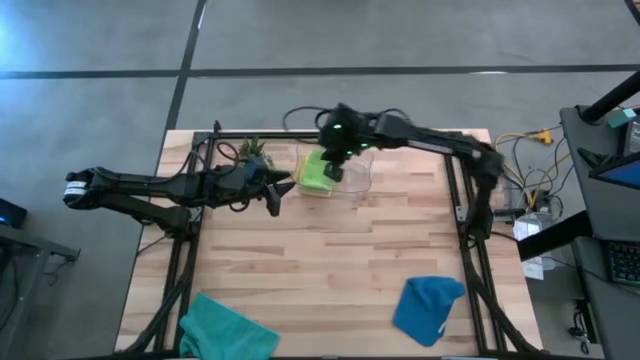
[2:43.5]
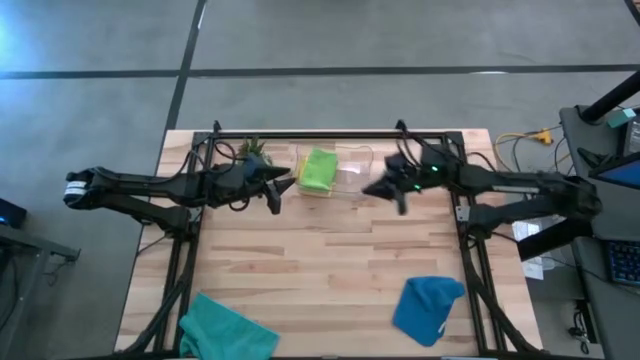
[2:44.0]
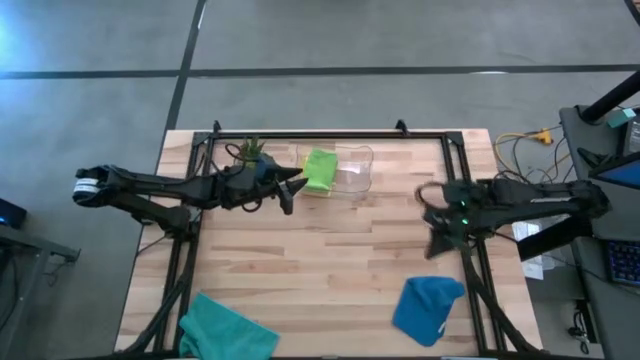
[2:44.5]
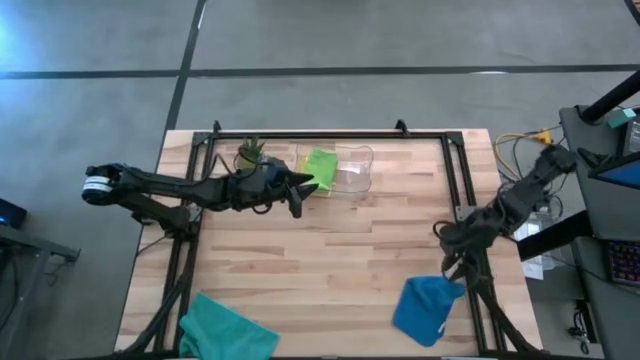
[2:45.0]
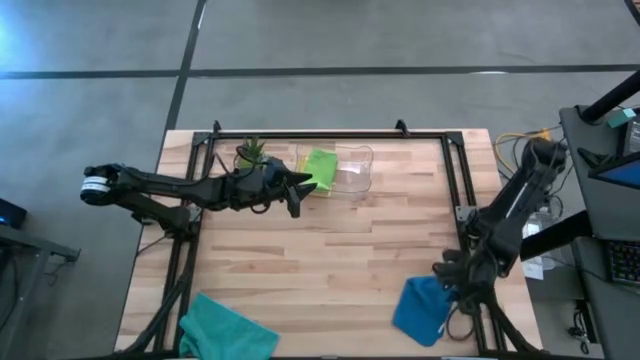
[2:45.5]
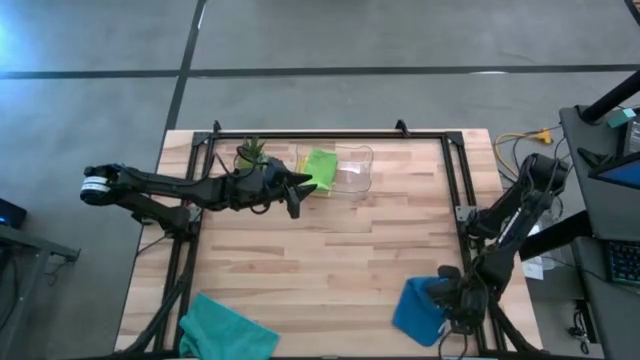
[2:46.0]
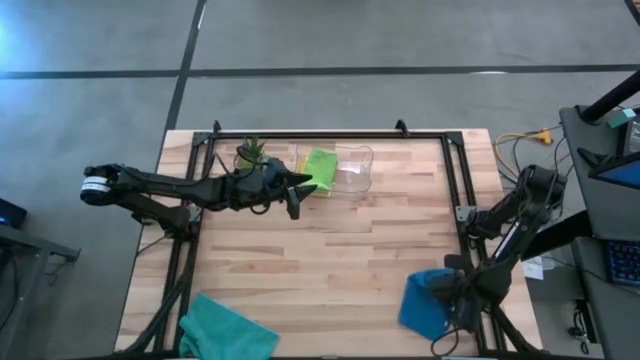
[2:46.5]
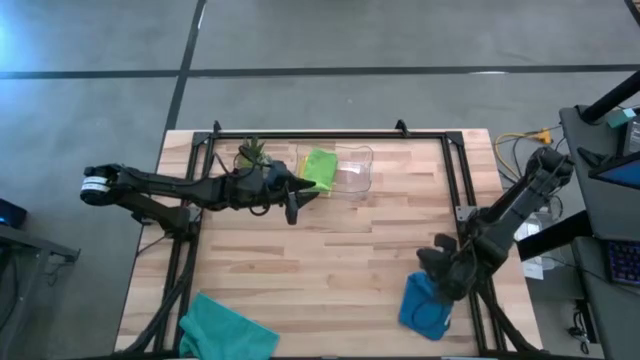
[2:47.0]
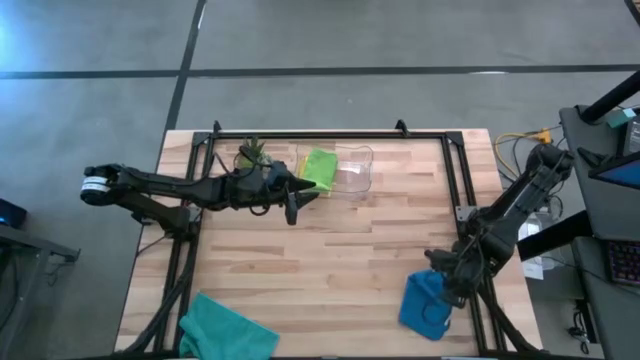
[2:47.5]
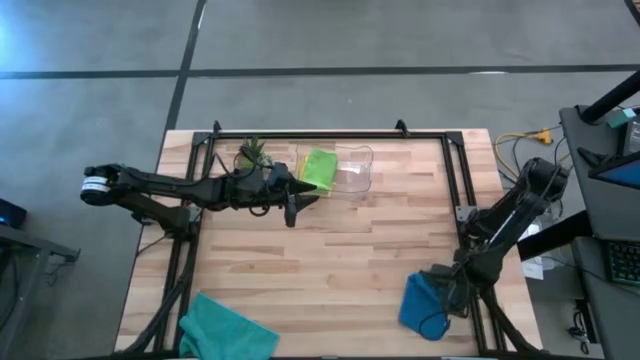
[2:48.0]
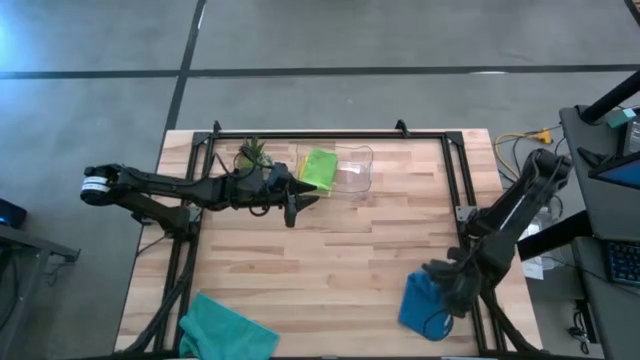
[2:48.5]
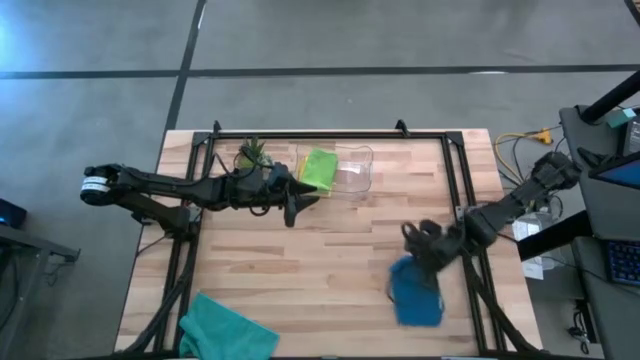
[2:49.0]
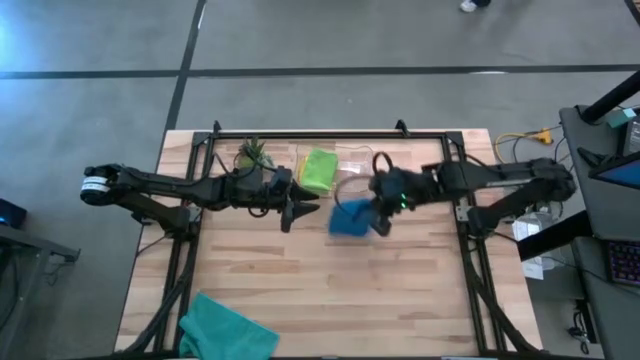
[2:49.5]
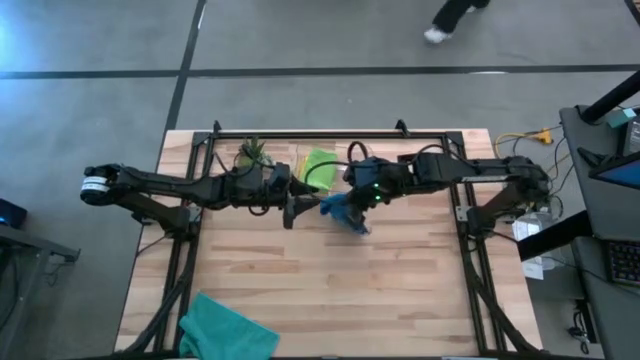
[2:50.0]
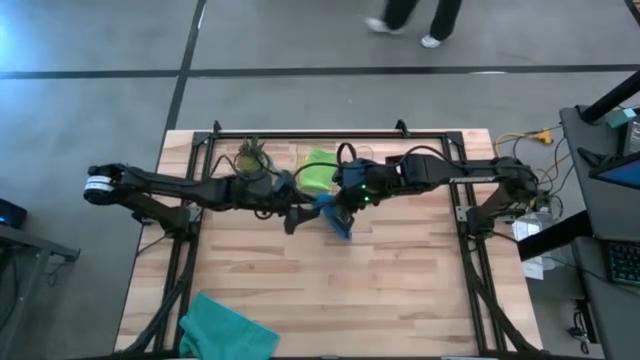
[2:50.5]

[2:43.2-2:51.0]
Task: Fold microfiber towels
Fold the blue microfiber towel

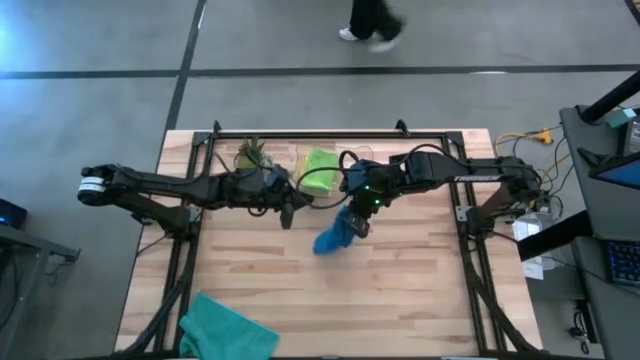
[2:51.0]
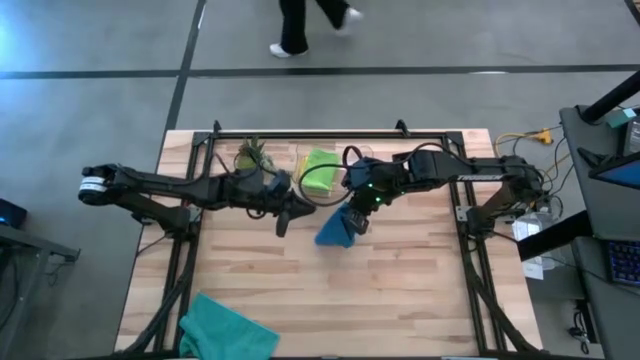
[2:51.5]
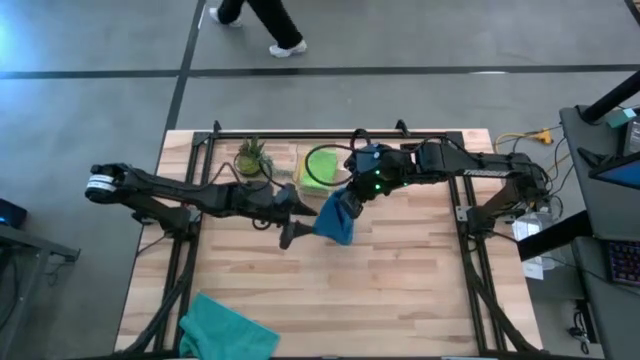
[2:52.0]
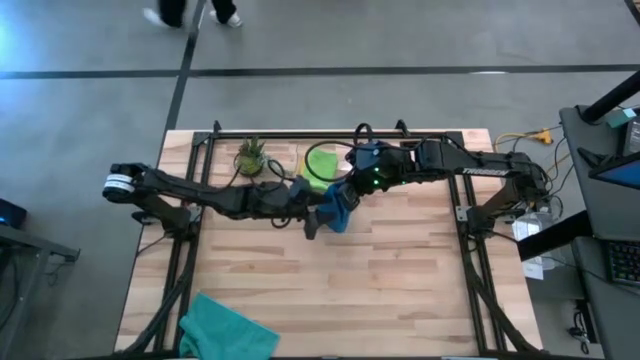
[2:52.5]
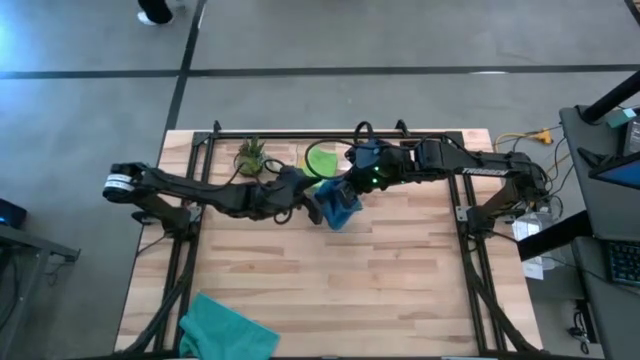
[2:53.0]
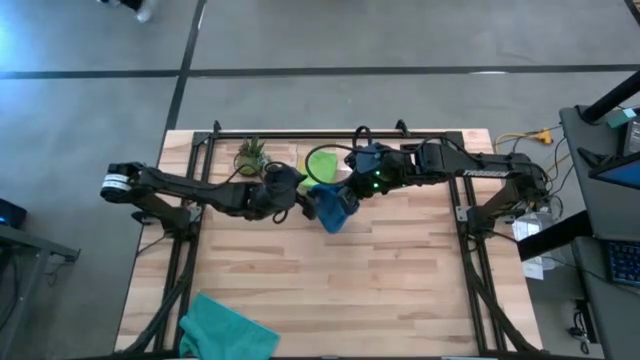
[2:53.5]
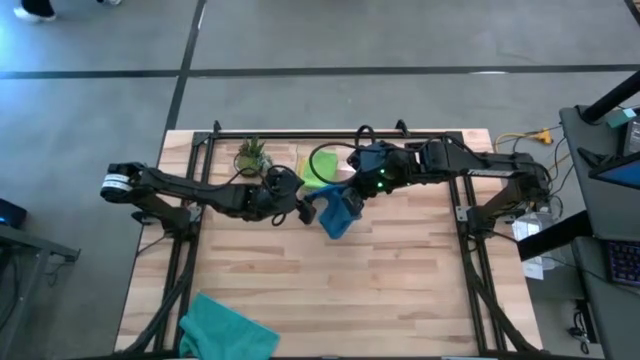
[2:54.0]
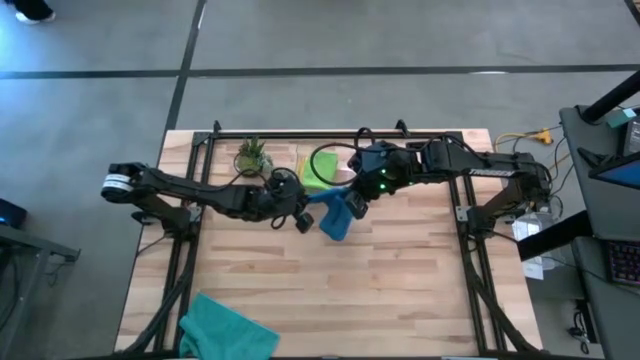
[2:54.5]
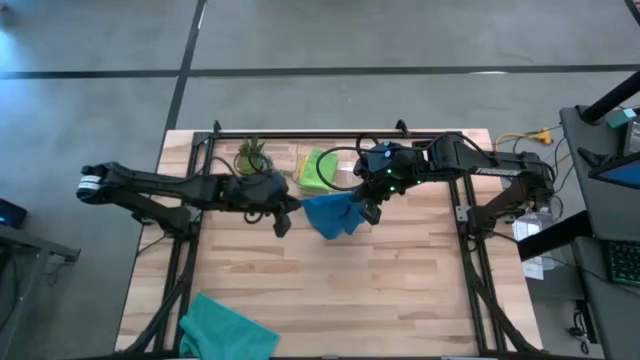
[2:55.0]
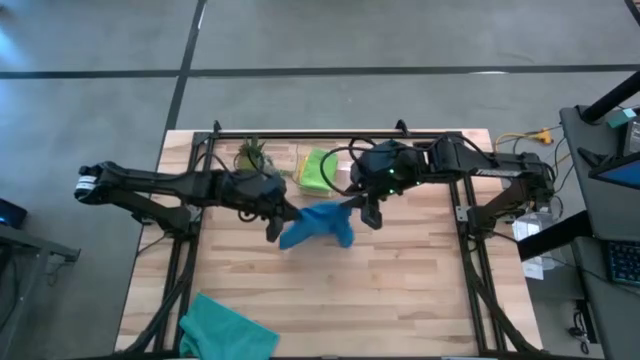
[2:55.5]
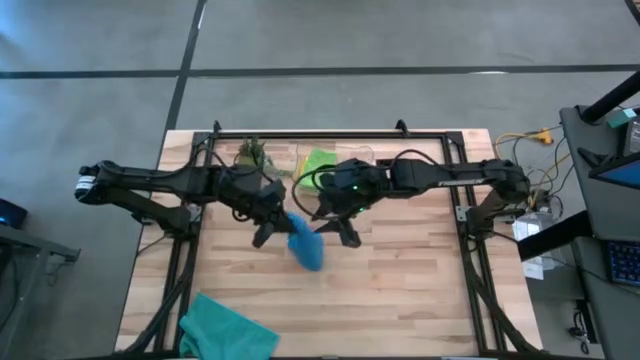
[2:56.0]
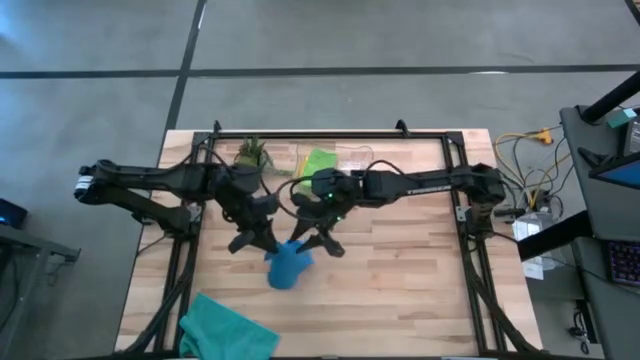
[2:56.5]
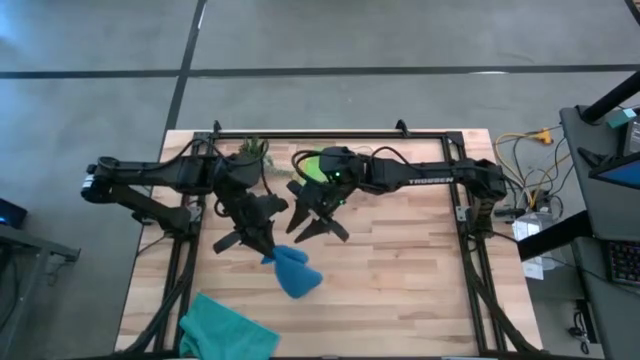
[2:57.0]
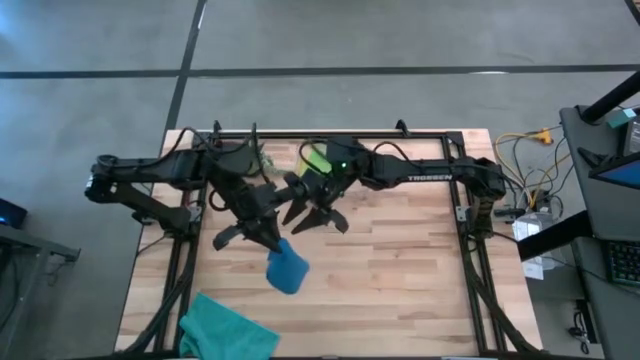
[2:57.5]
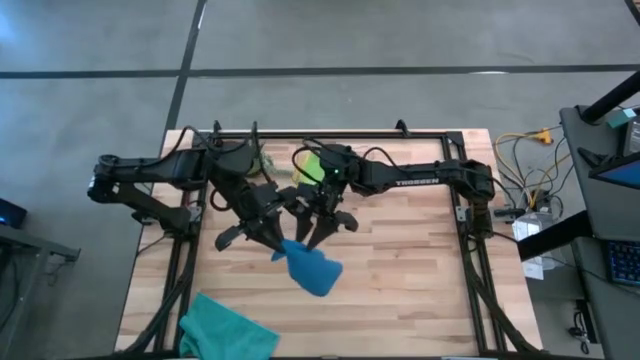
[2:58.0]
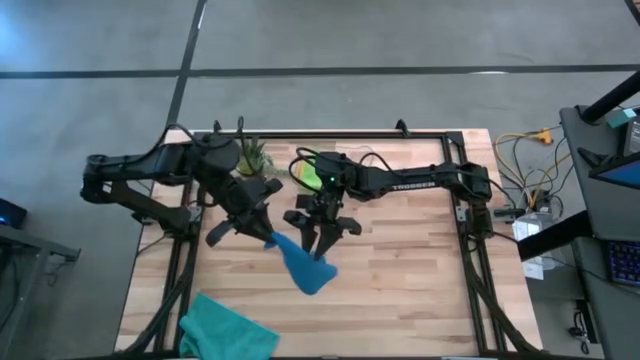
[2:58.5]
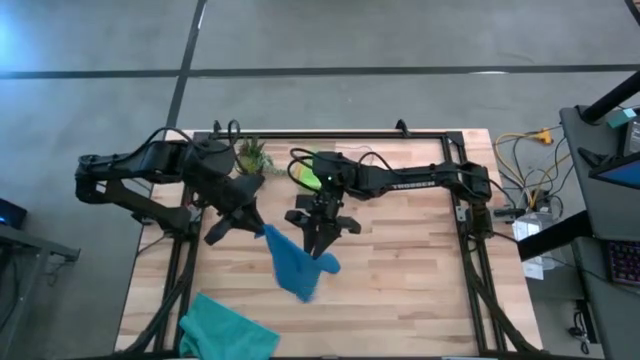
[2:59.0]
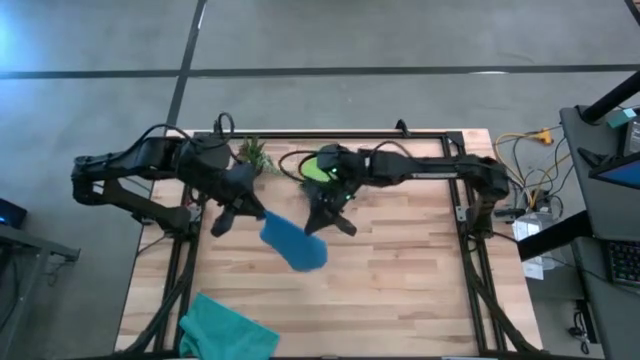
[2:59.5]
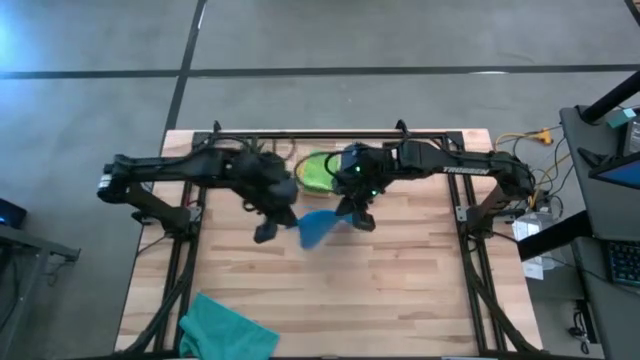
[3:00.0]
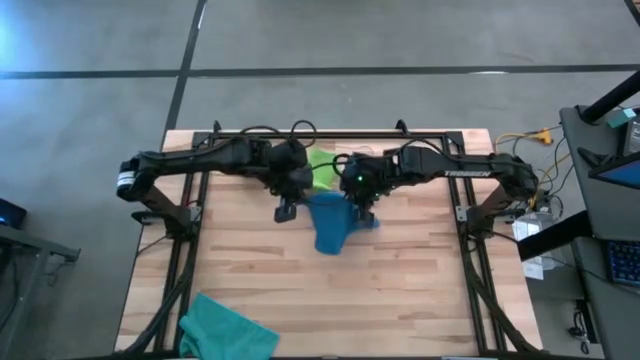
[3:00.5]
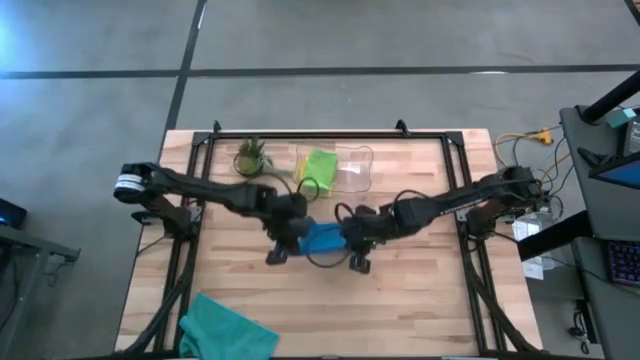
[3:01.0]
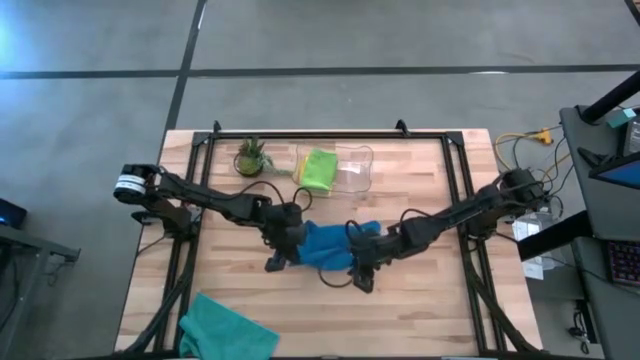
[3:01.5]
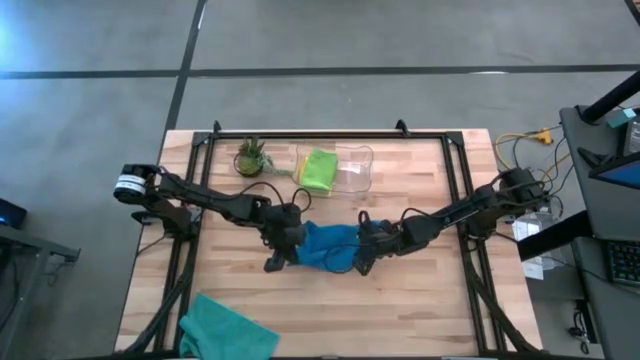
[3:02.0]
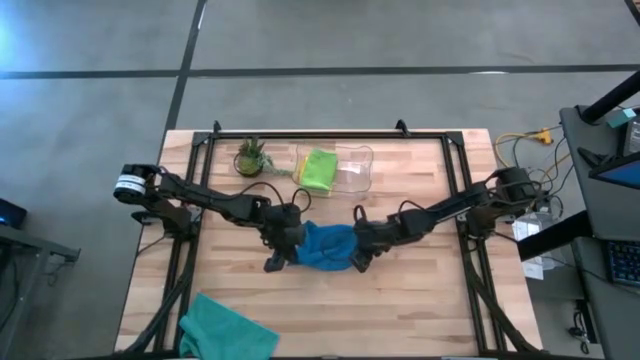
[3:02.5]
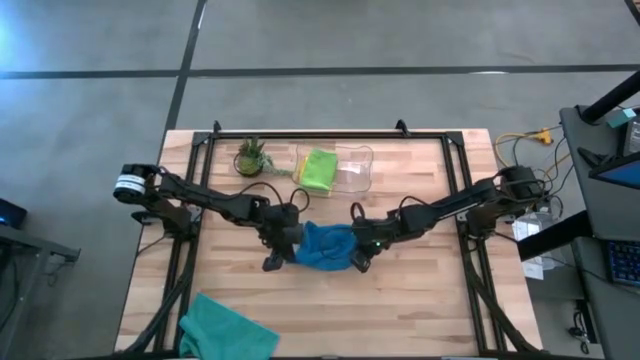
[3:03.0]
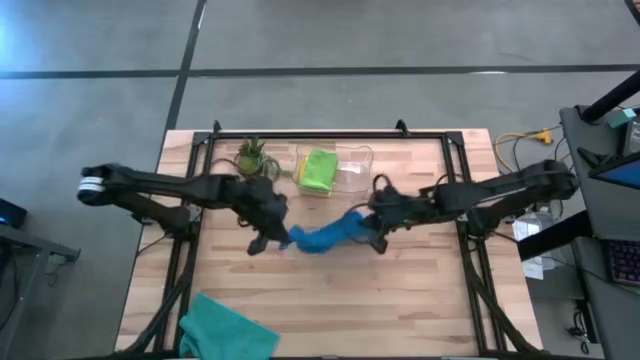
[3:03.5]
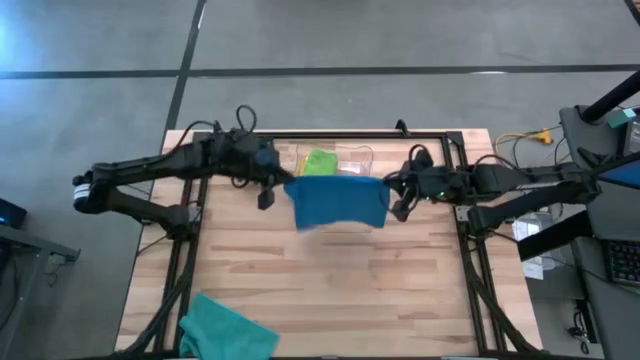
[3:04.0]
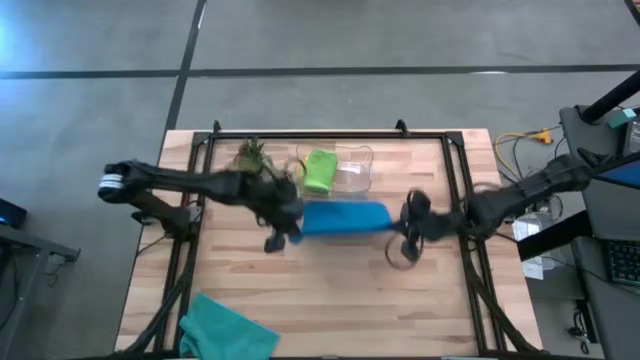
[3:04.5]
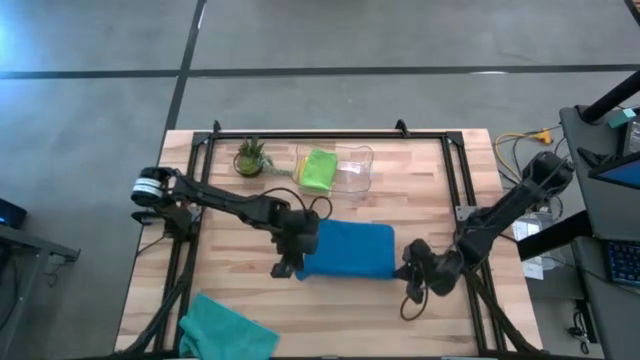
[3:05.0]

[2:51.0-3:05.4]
Fold the blue microfiber towel
